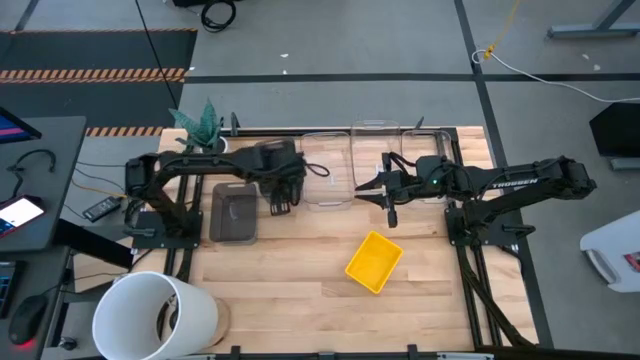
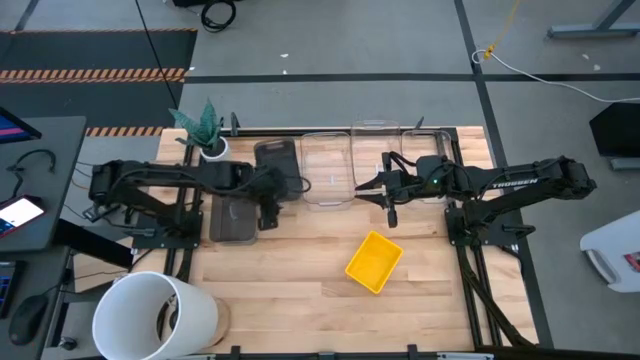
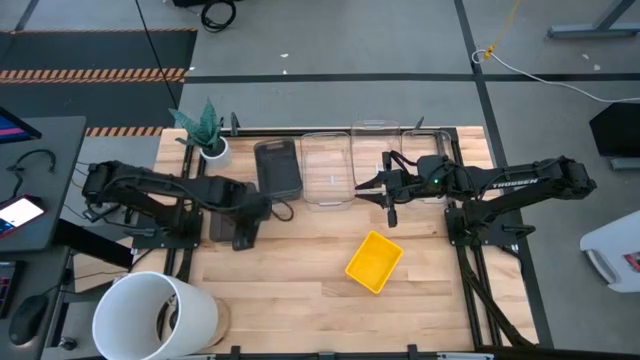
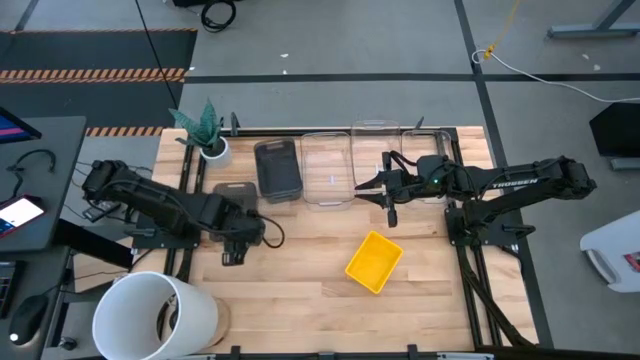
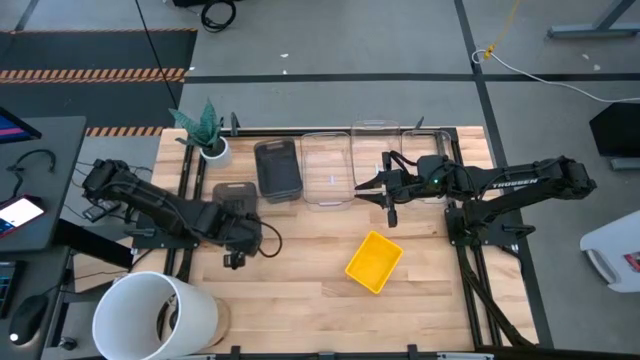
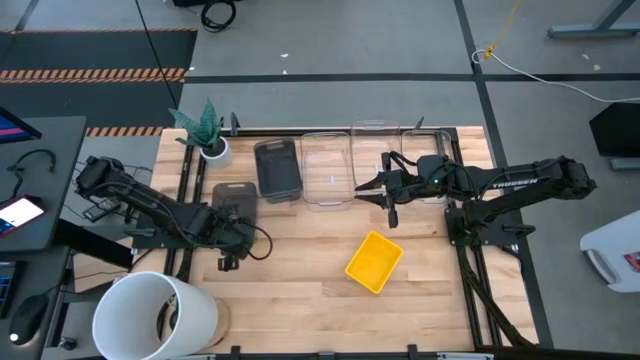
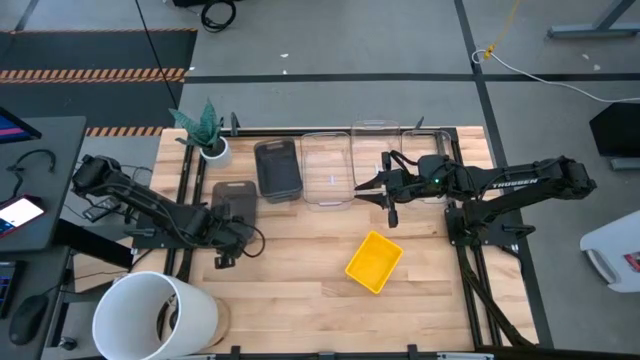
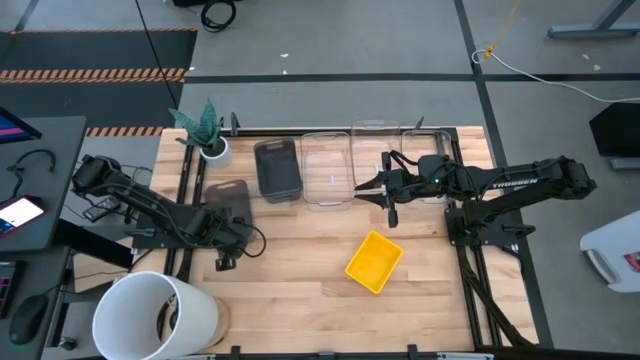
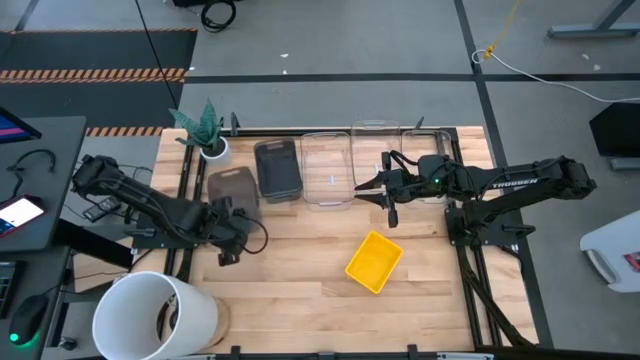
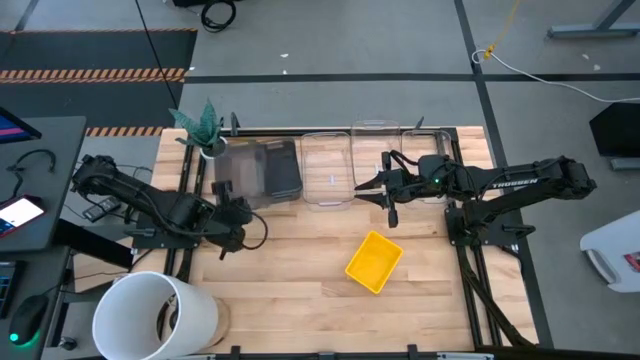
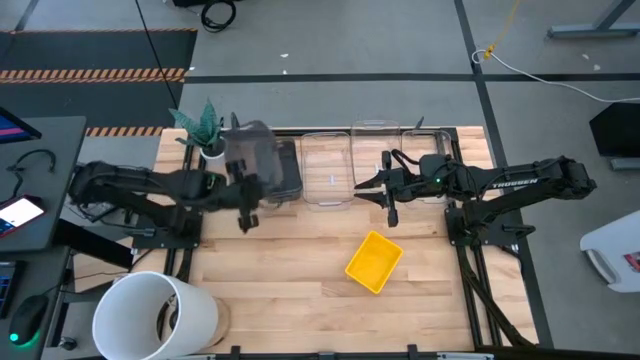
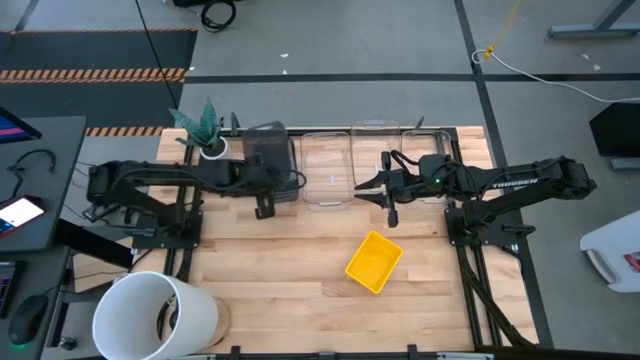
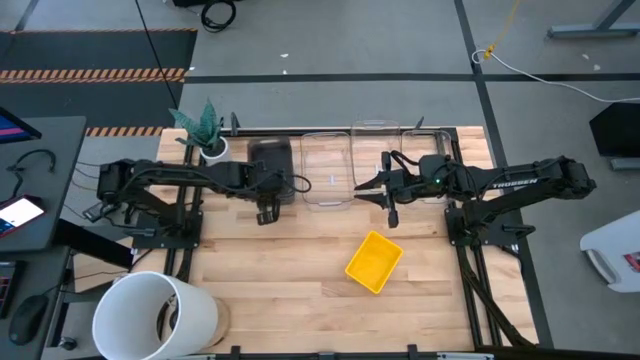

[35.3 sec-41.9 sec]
Stack the black bin on the stacked black bin

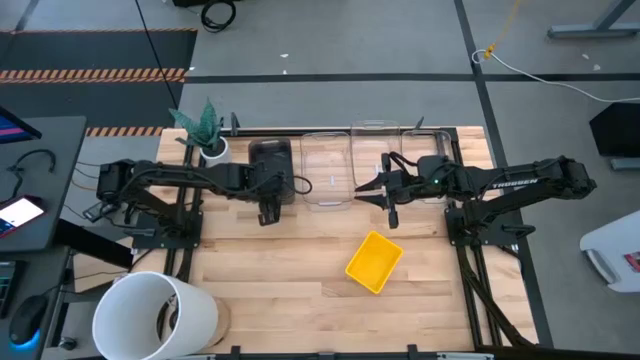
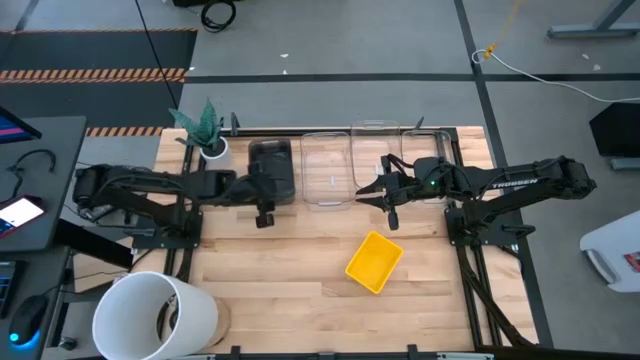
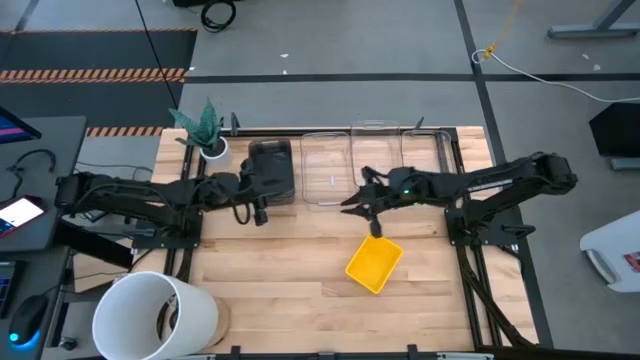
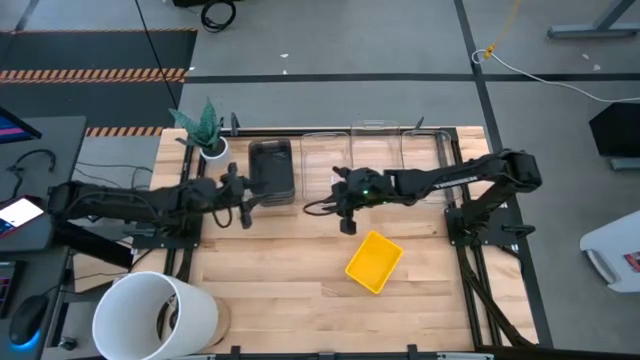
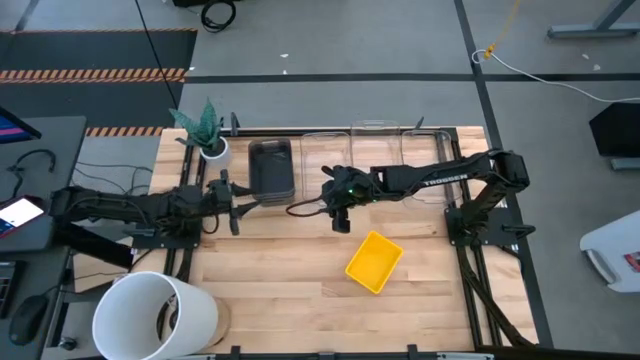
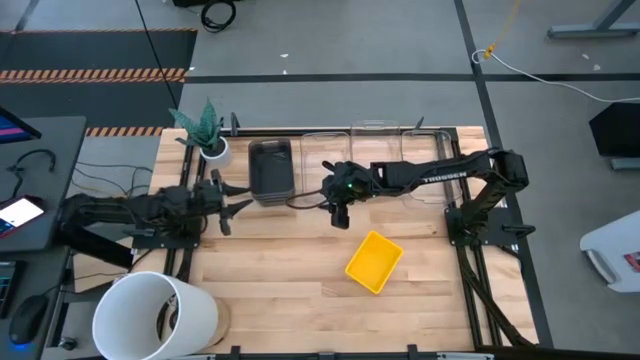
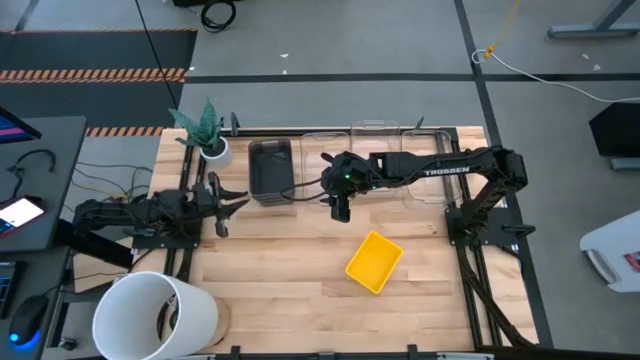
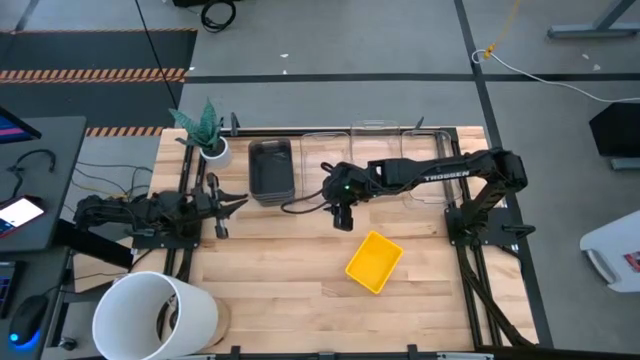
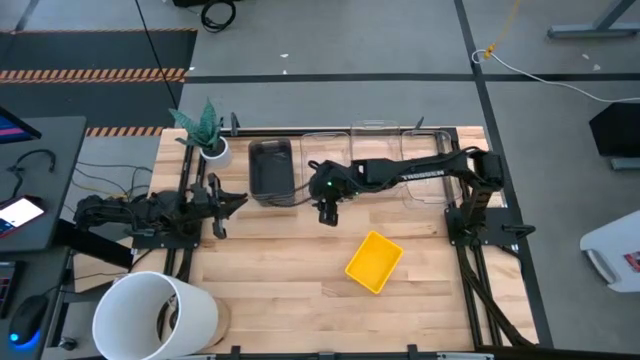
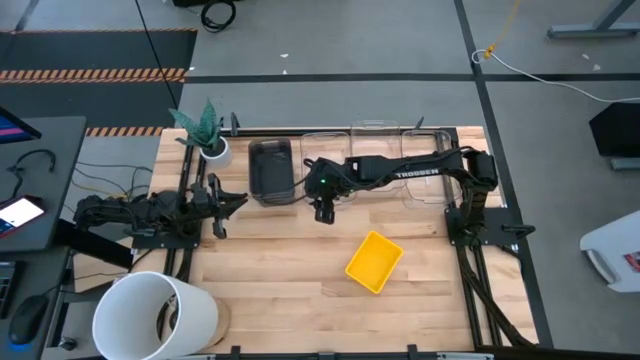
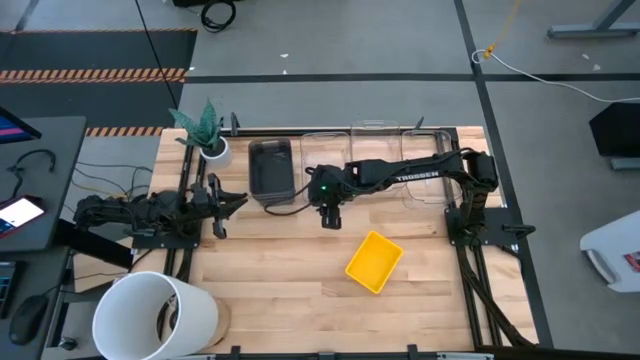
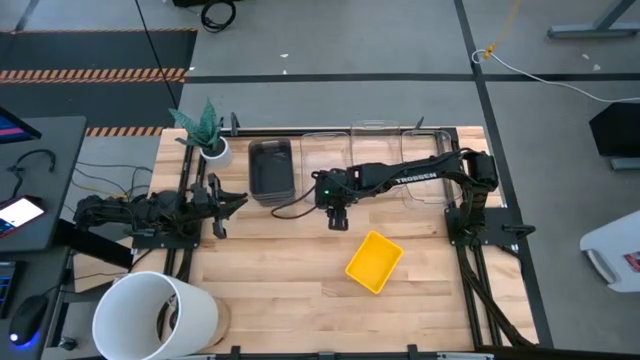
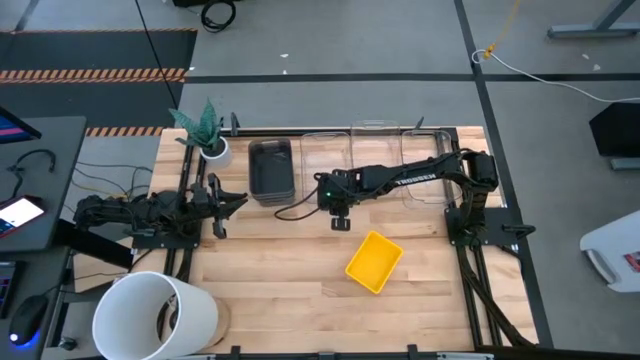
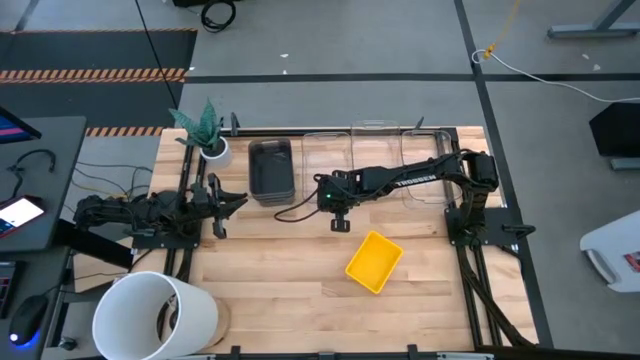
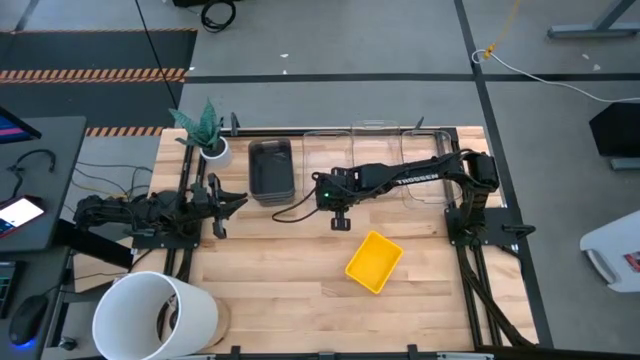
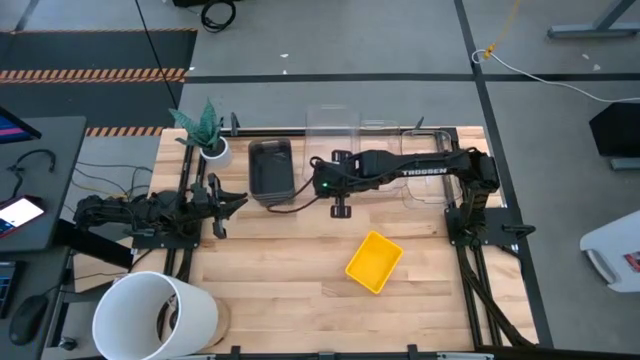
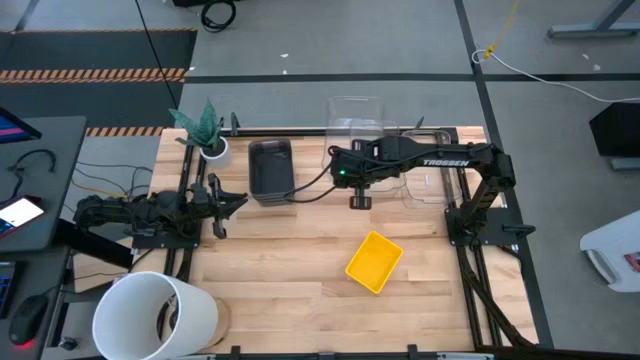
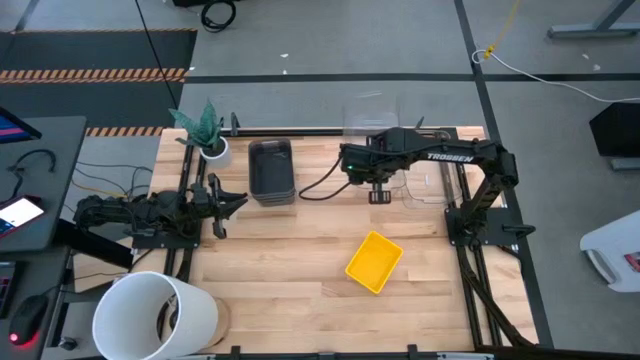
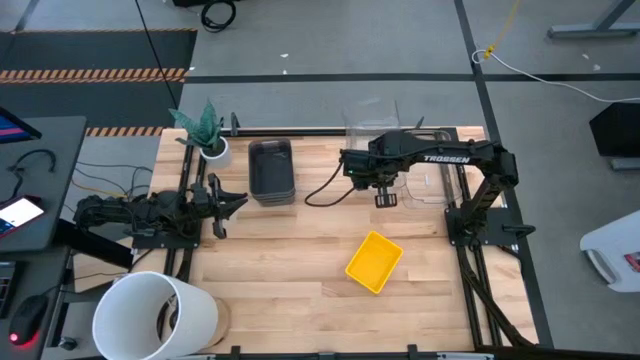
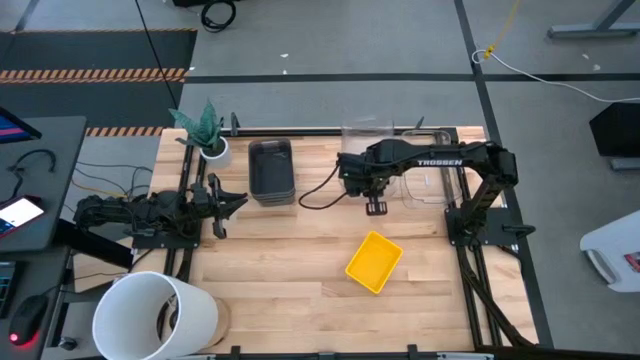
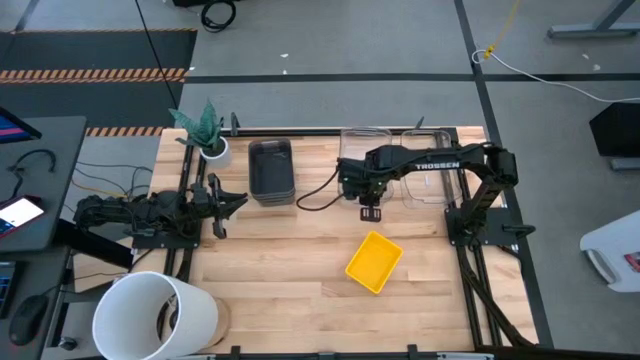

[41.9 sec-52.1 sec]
Stack the left transparent bin on the middle transparent bin

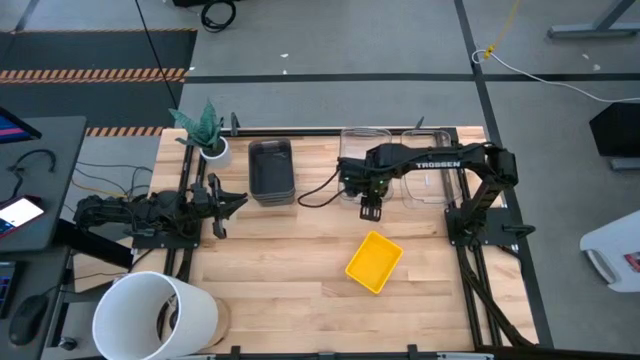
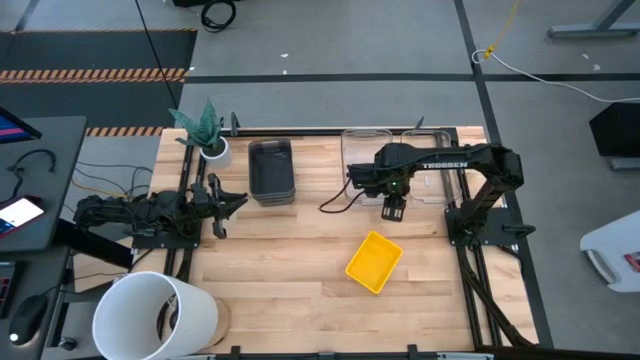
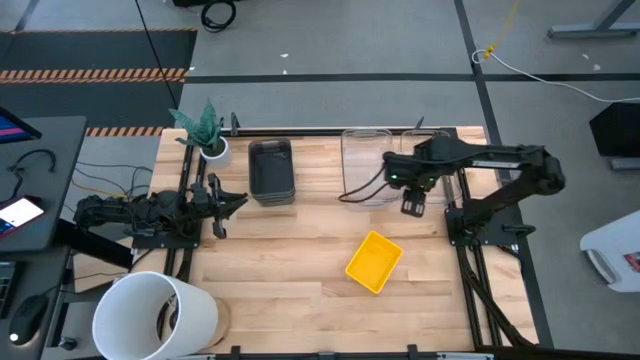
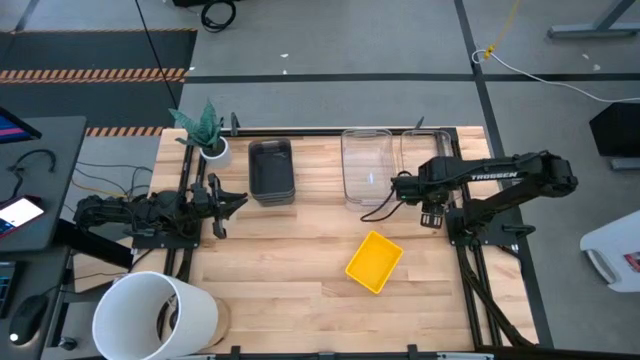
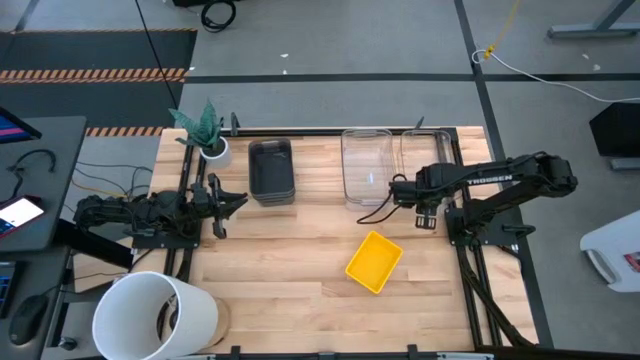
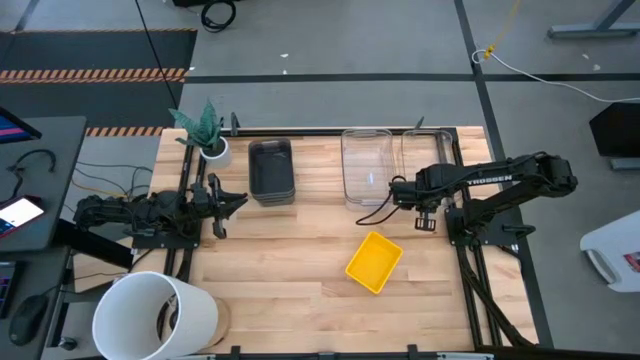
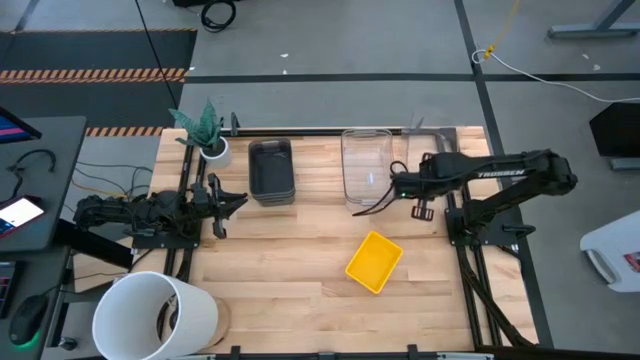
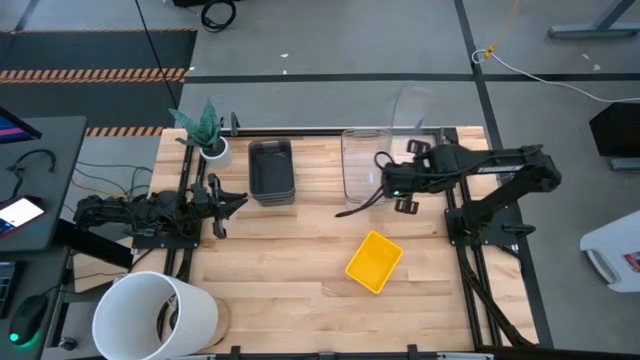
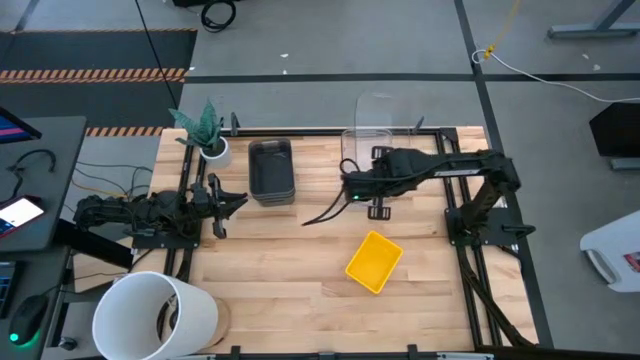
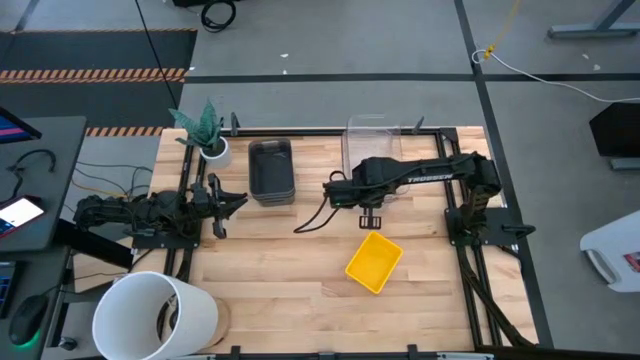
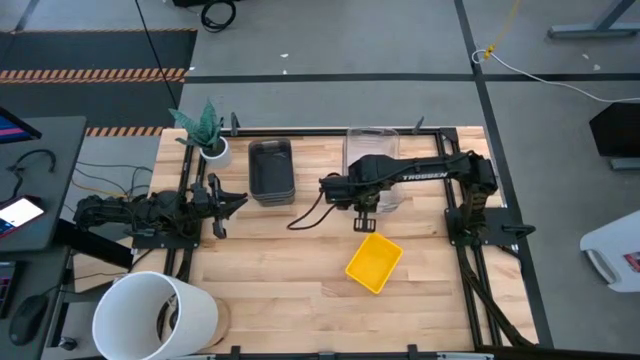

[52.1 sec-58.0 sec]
Stack the transparent bin on the stacked transparent bin
